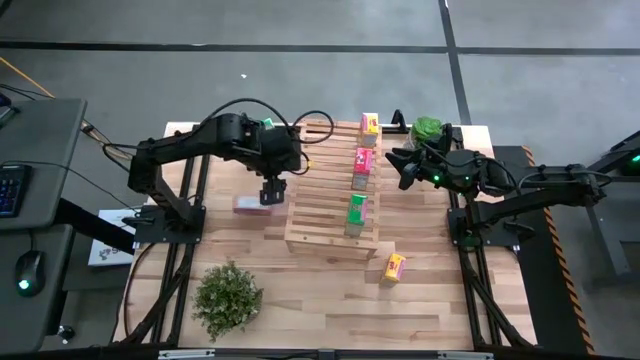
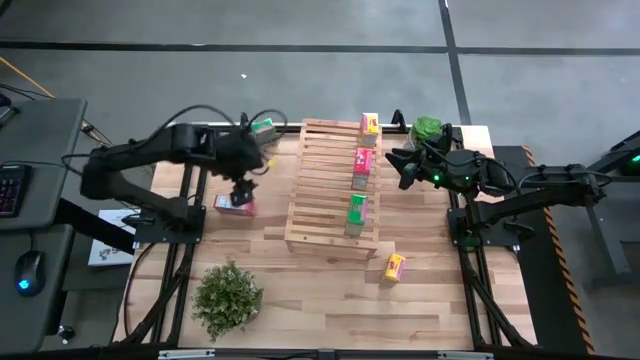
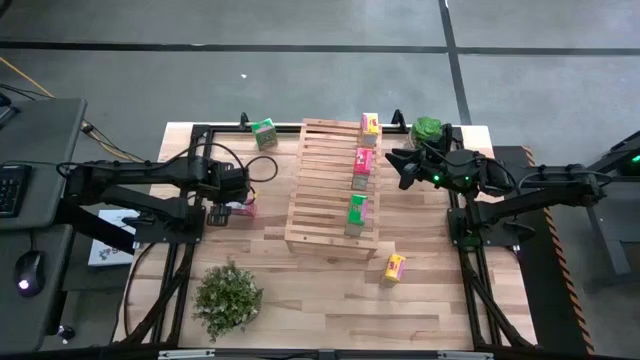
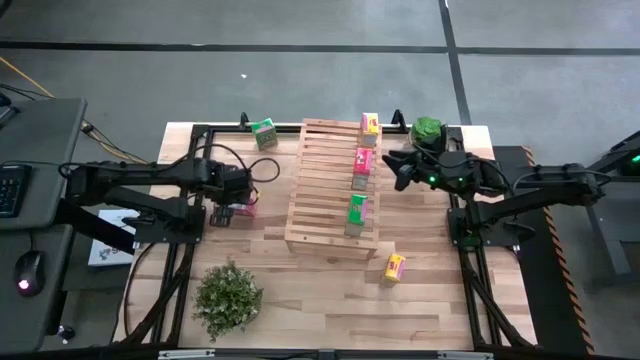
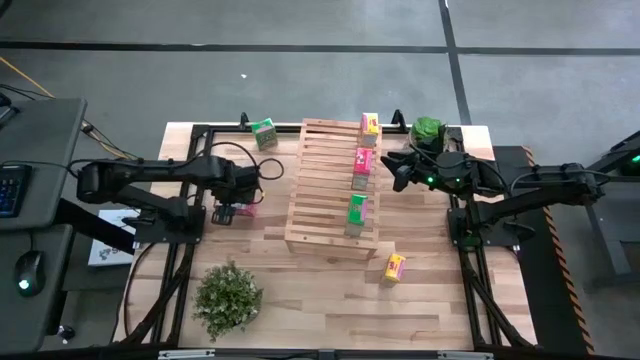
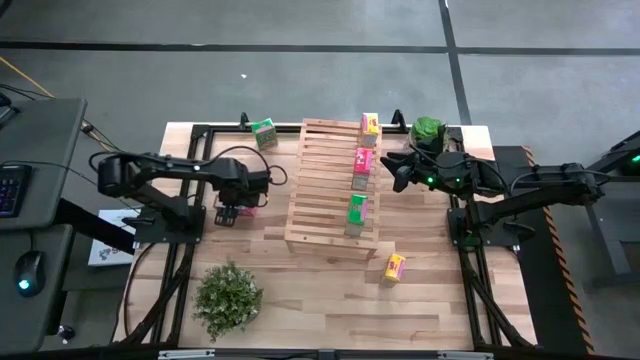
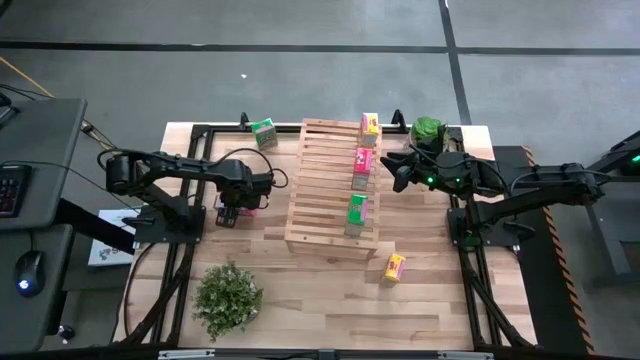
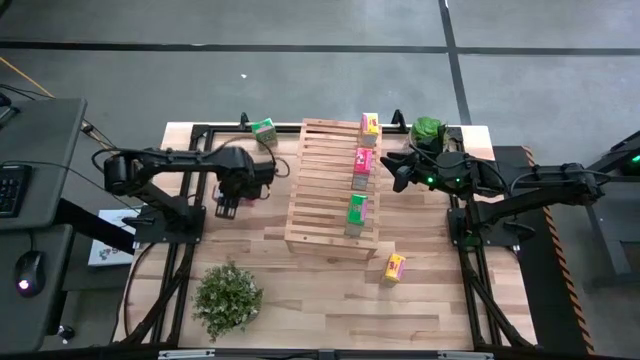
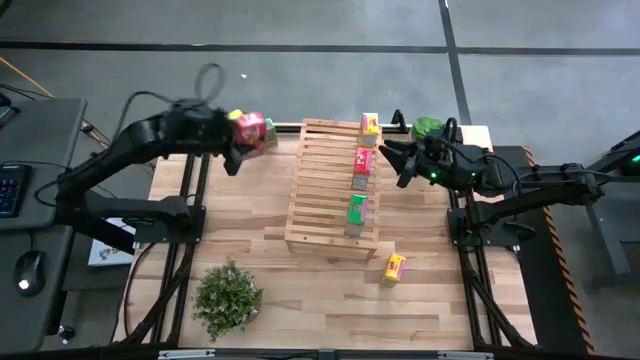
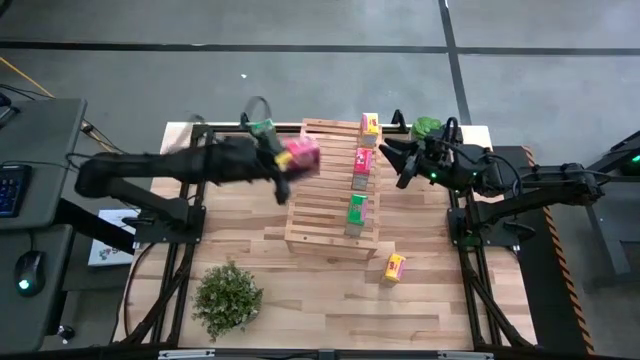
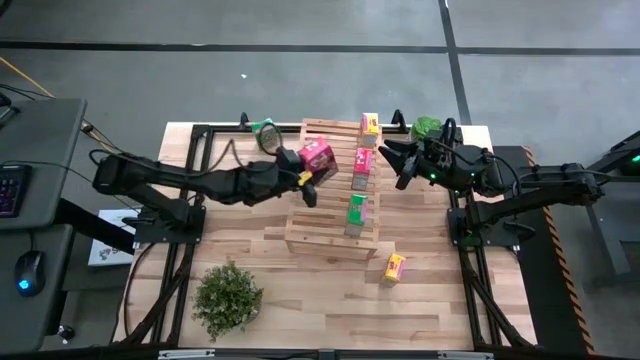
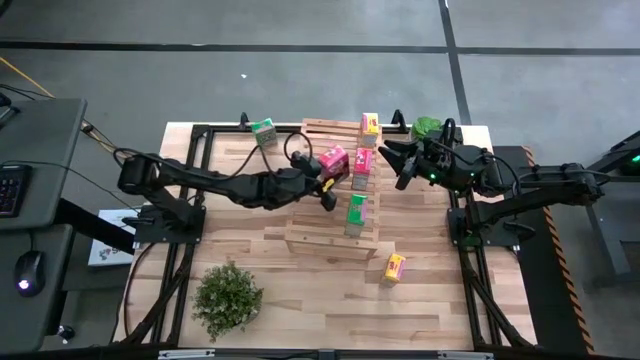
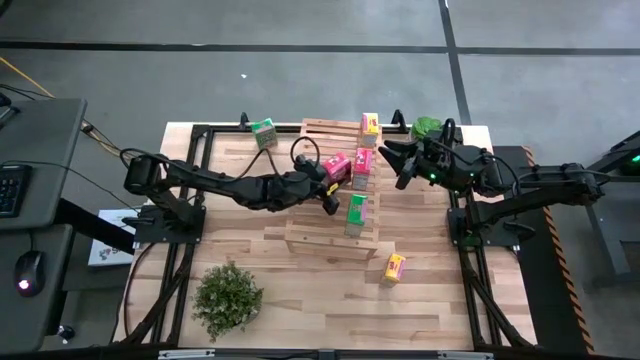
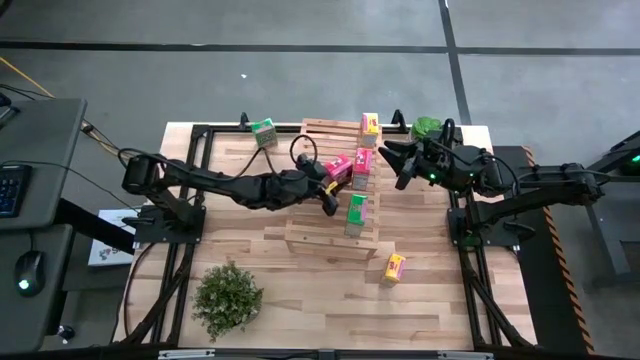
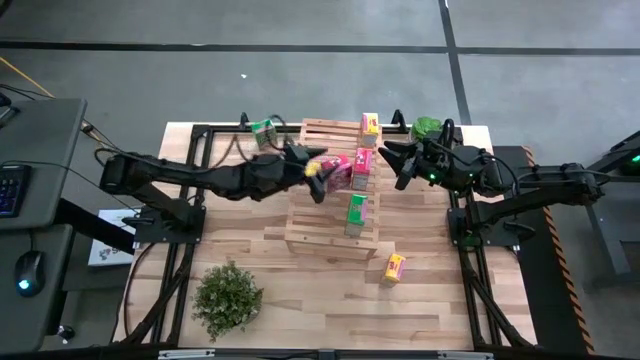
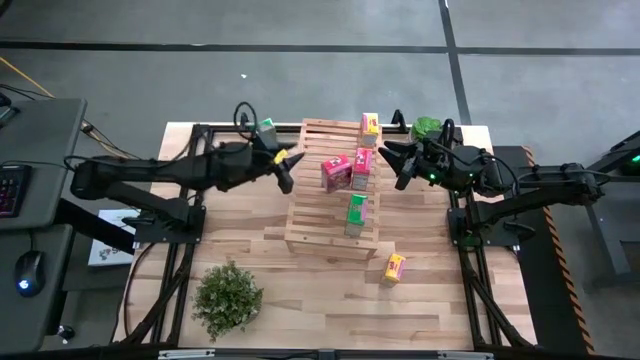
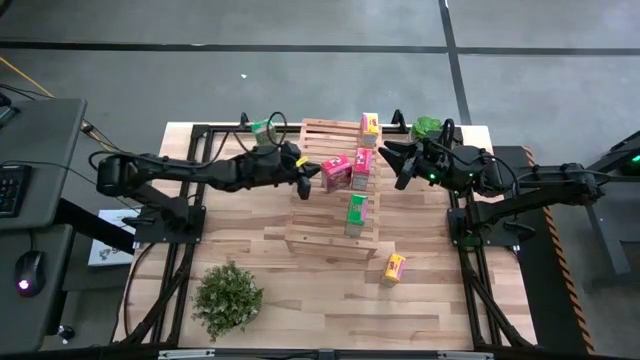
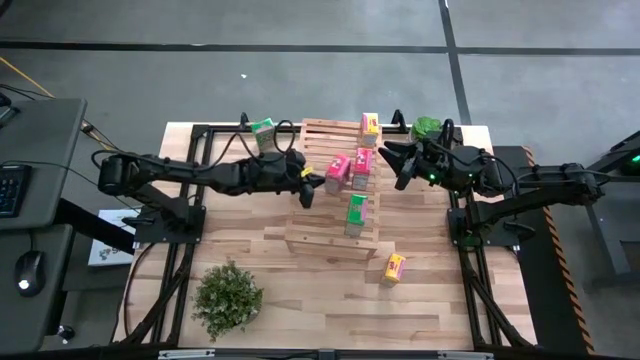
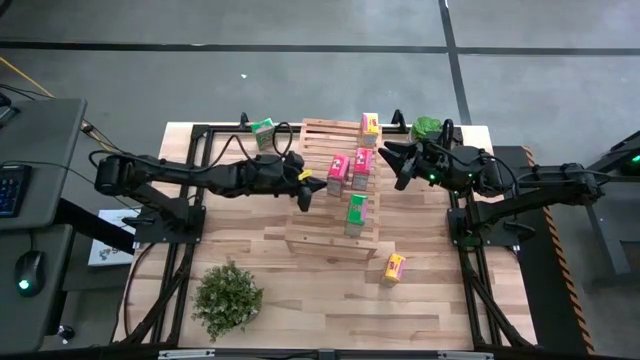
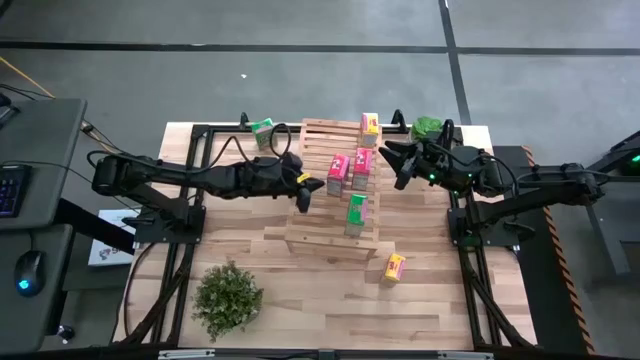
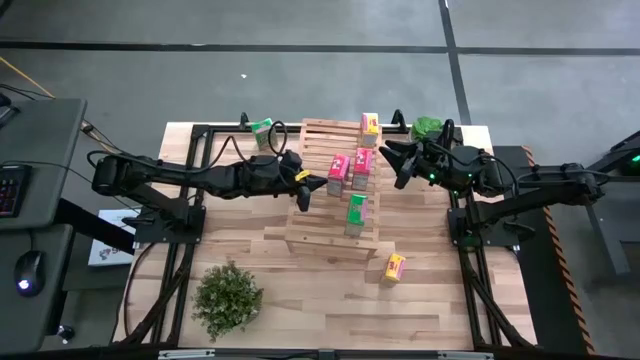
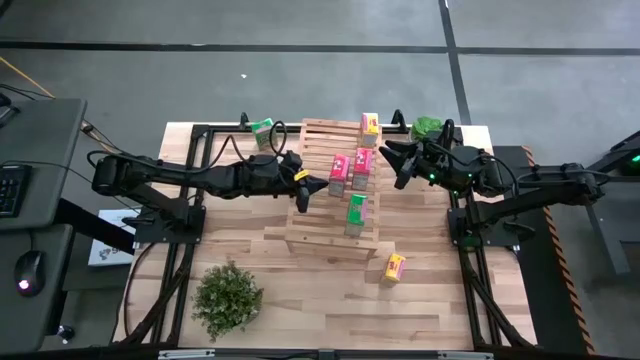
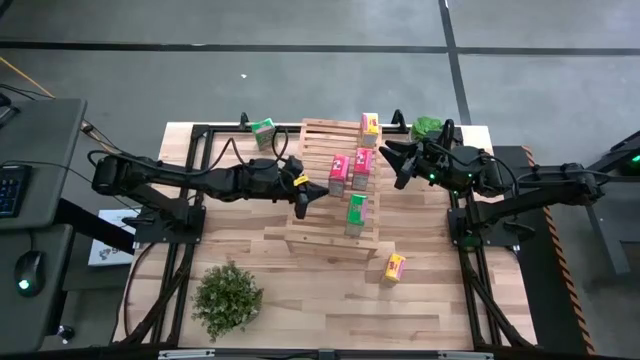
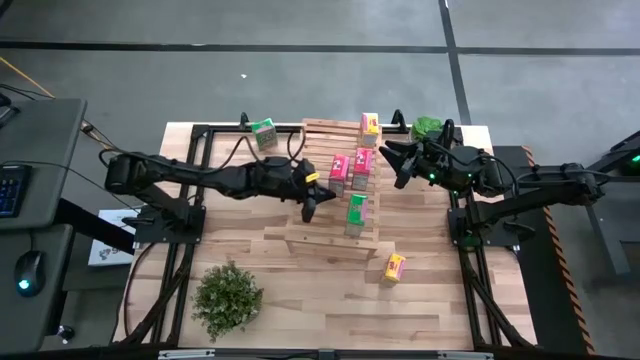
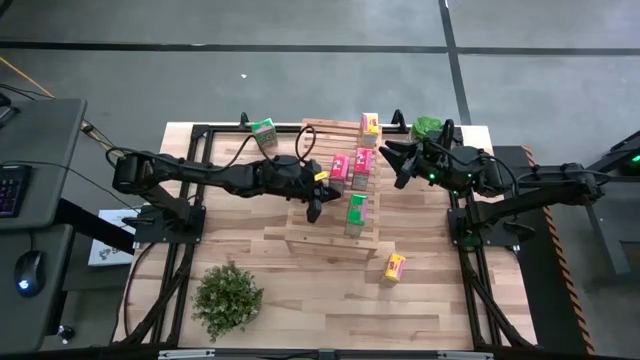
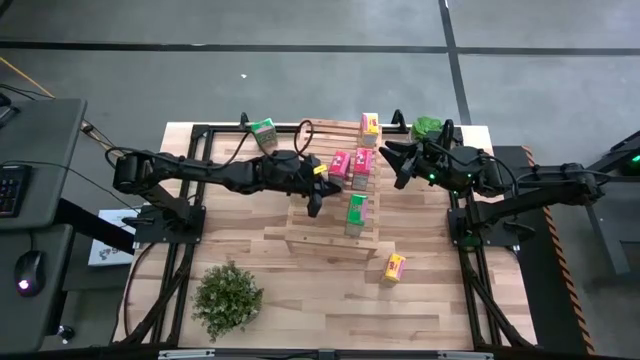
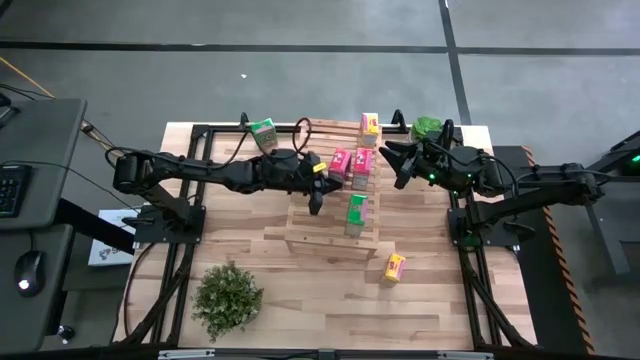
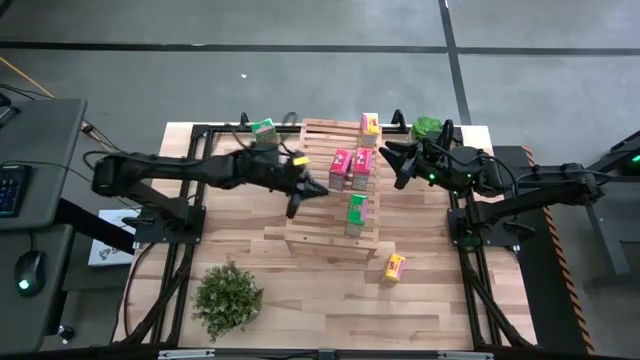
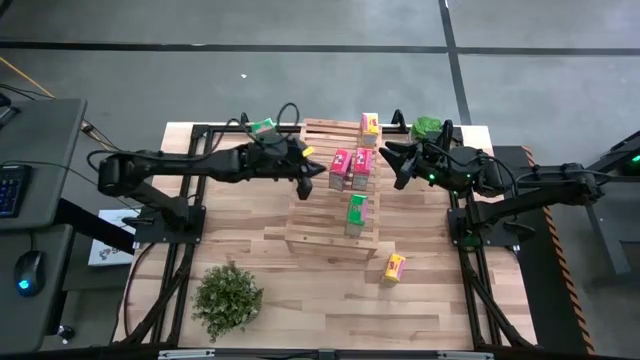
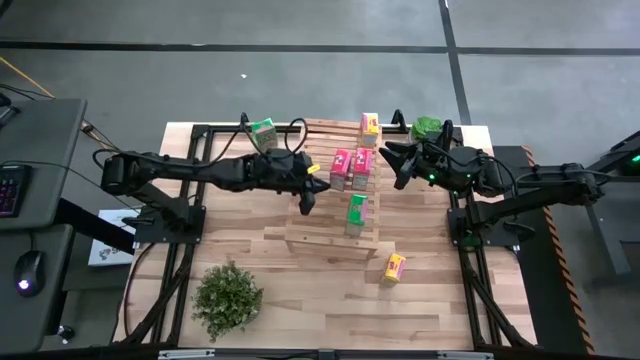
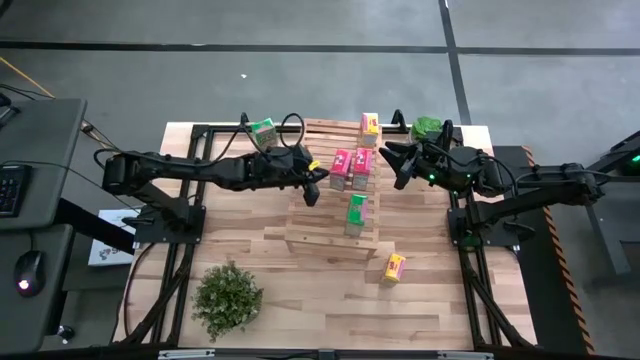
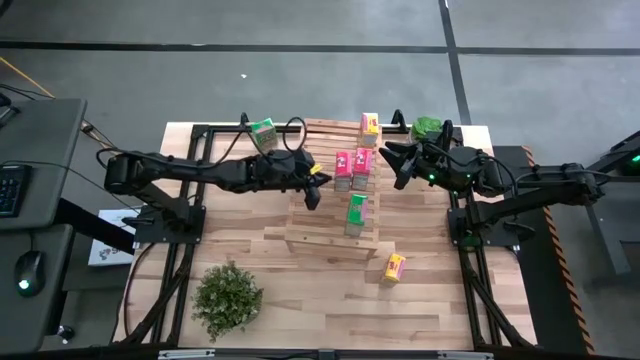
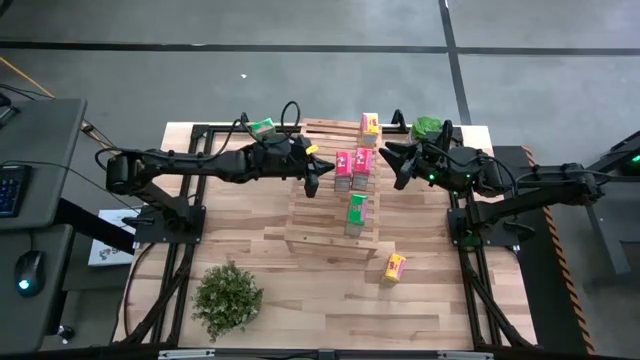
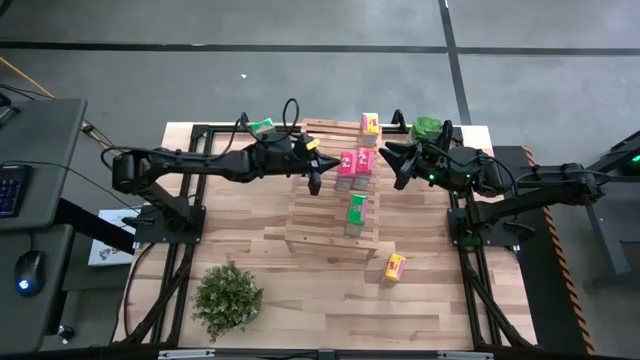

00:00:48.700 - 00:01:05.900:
Task: Stack cereal on shelf
Put the red cereal box on the shelf aligned with other red cereal box

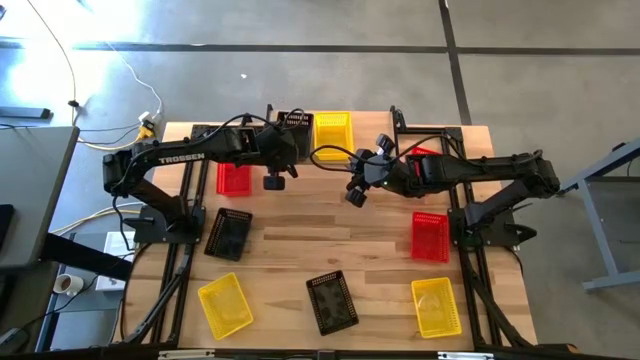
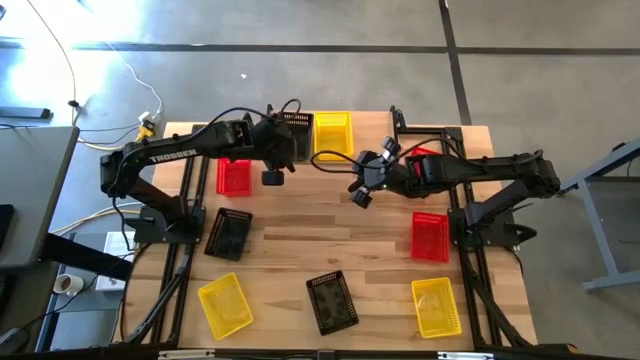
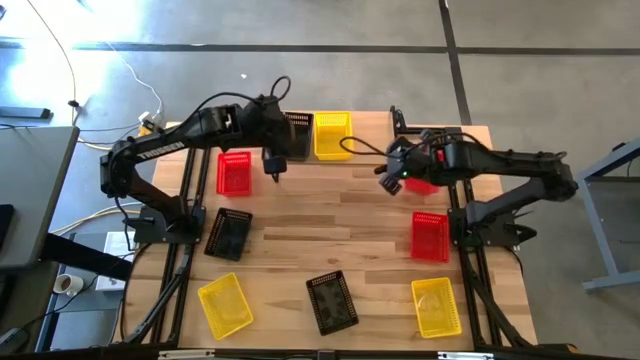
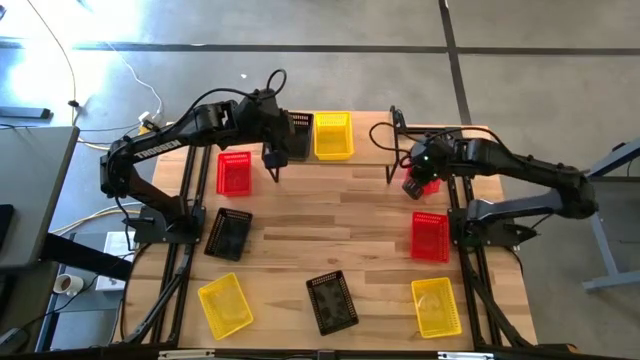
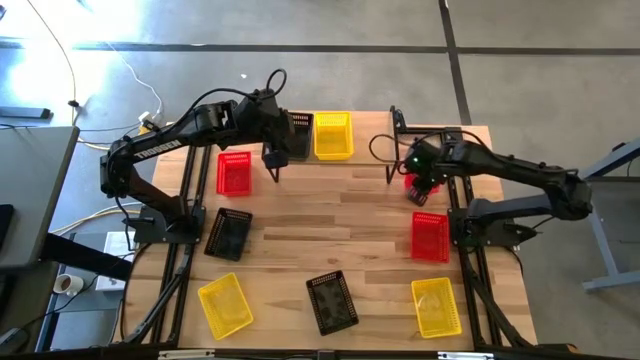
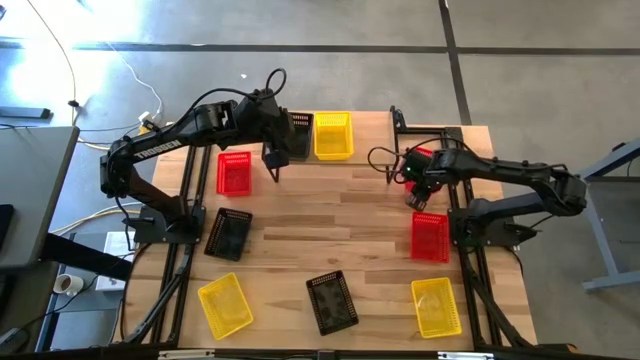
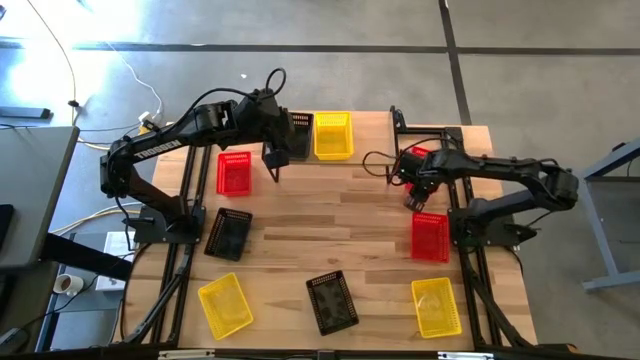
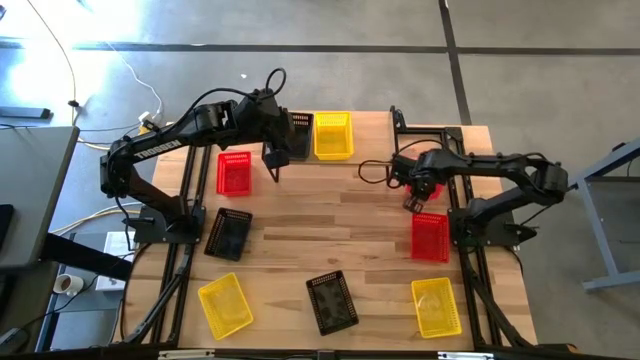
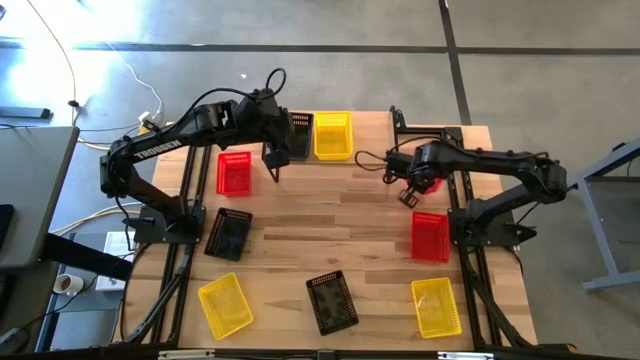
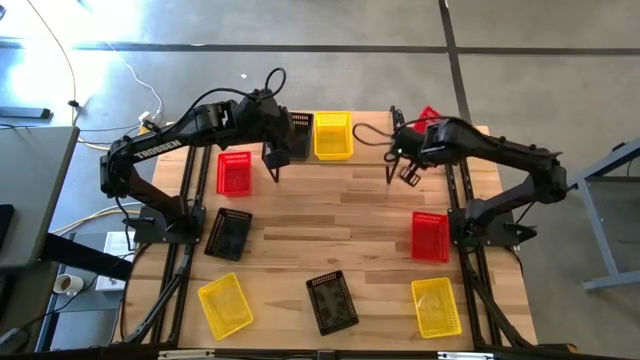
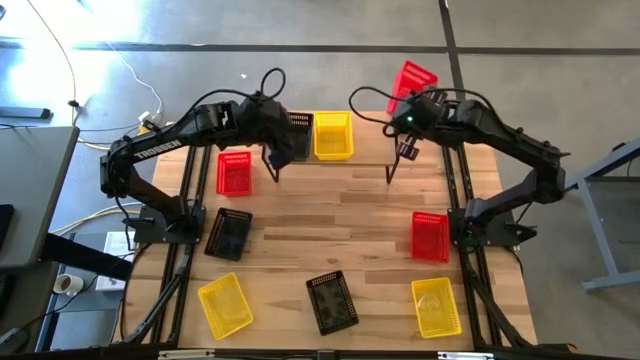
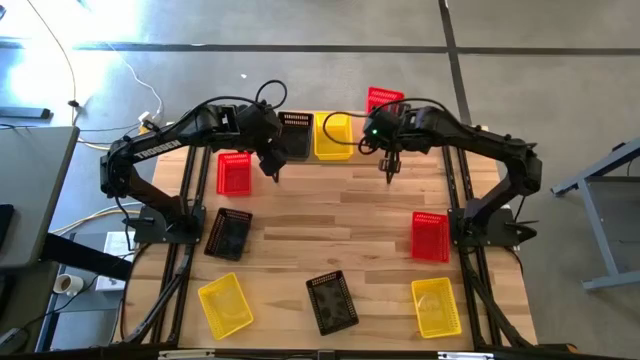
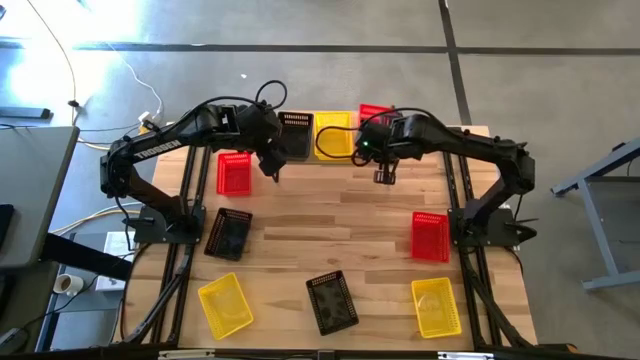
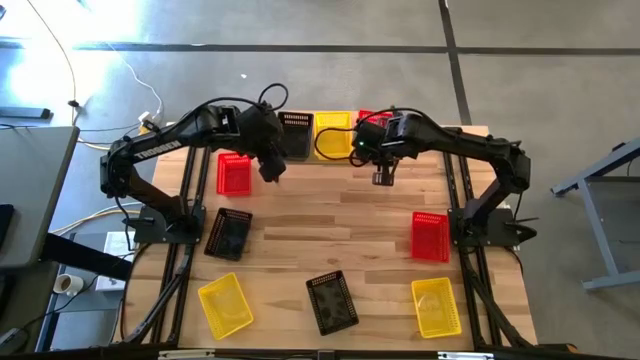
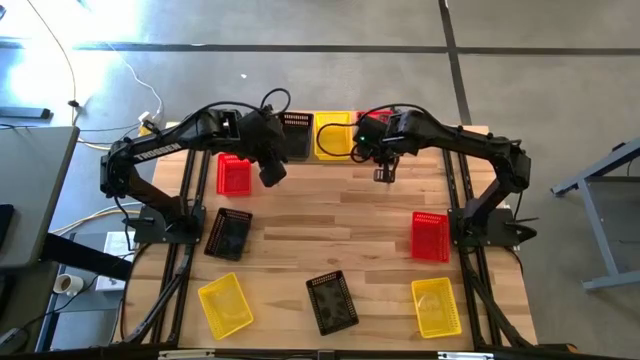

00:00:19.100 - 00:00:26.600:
Task: Stack baskets on shelf by color
Put the top right red bin on the shelf
